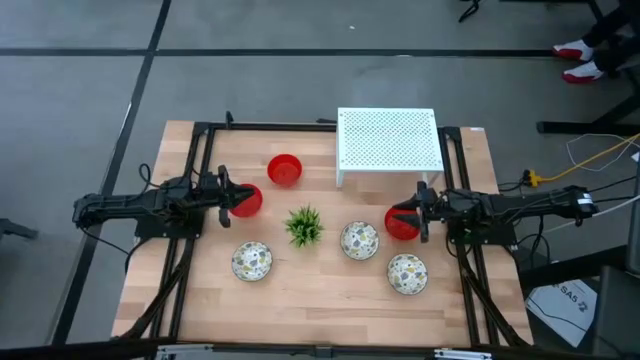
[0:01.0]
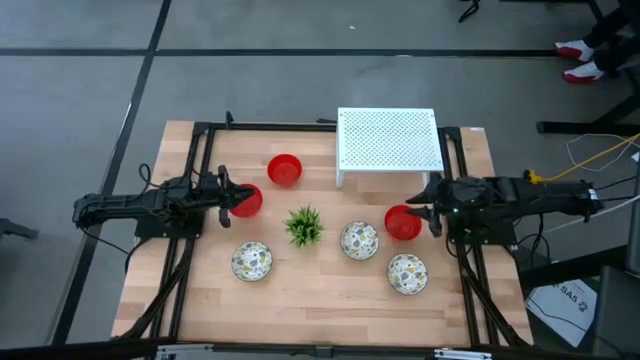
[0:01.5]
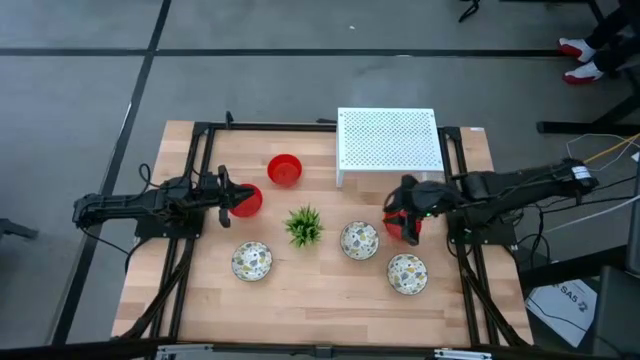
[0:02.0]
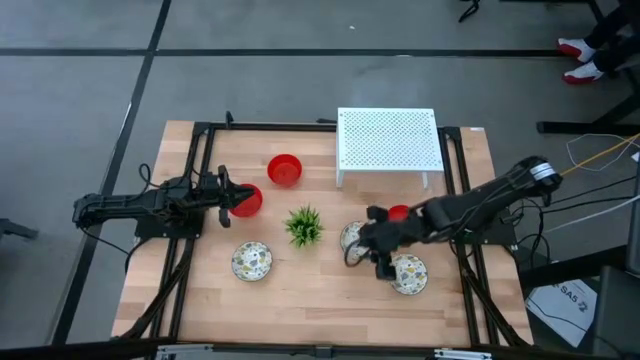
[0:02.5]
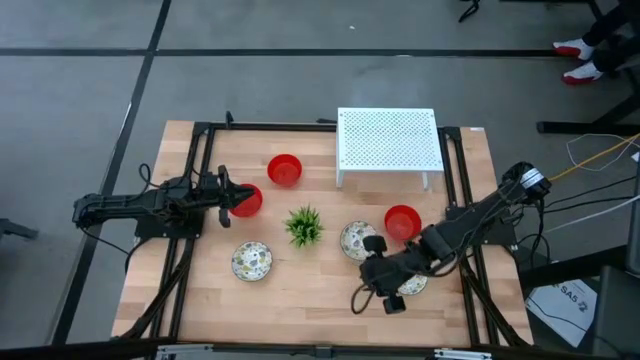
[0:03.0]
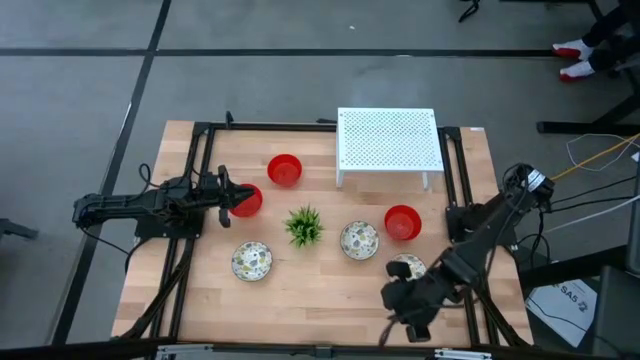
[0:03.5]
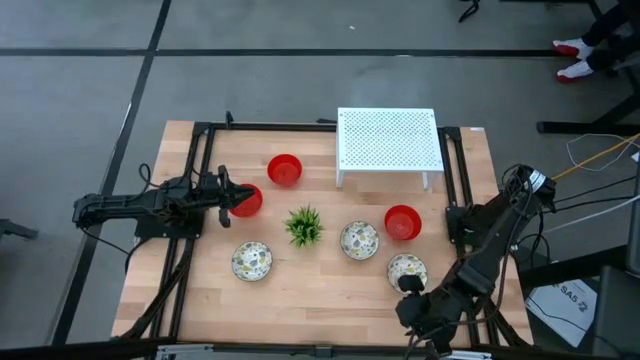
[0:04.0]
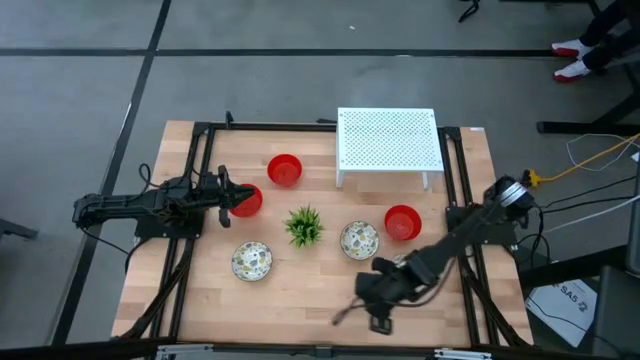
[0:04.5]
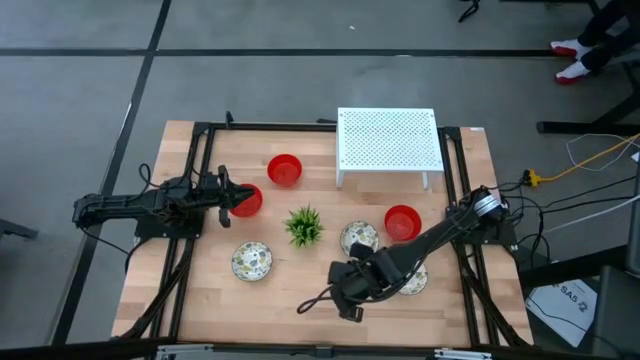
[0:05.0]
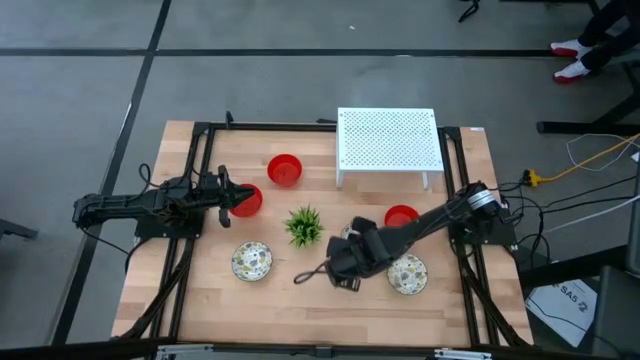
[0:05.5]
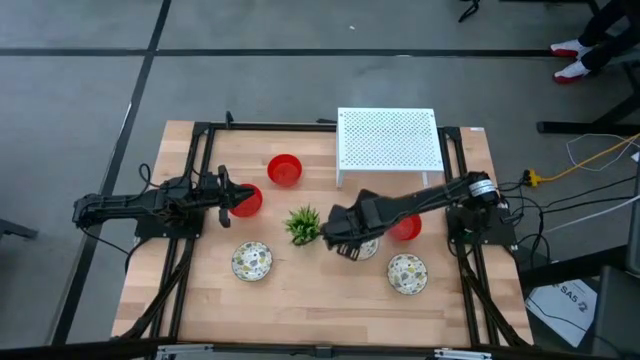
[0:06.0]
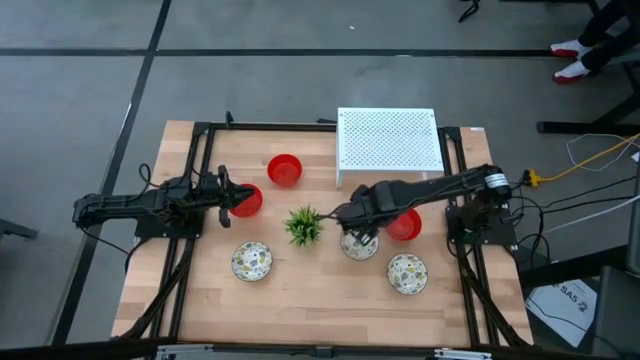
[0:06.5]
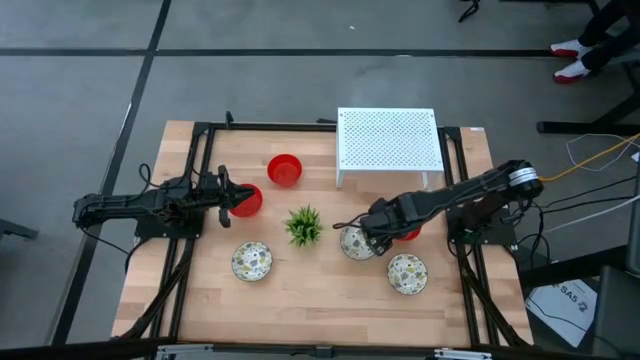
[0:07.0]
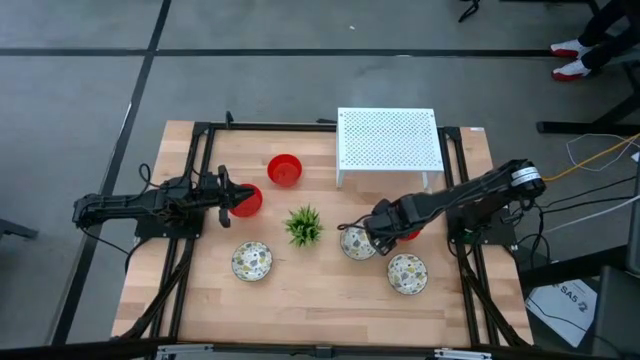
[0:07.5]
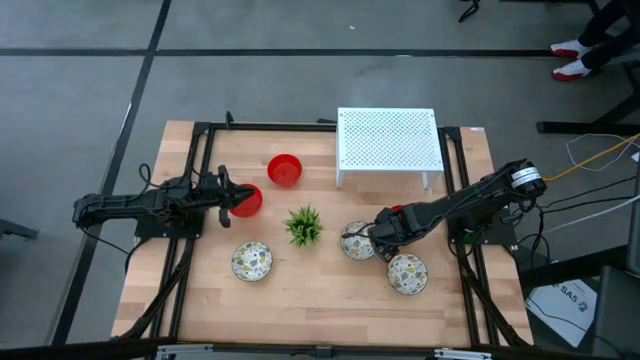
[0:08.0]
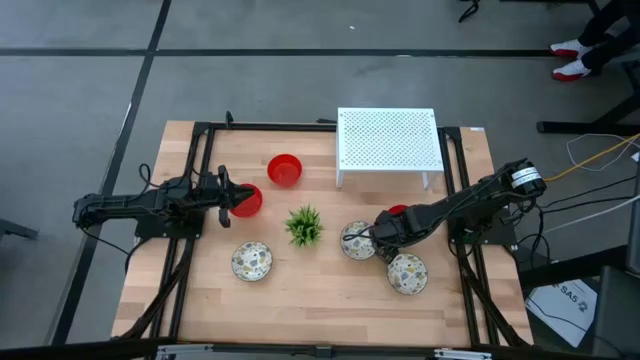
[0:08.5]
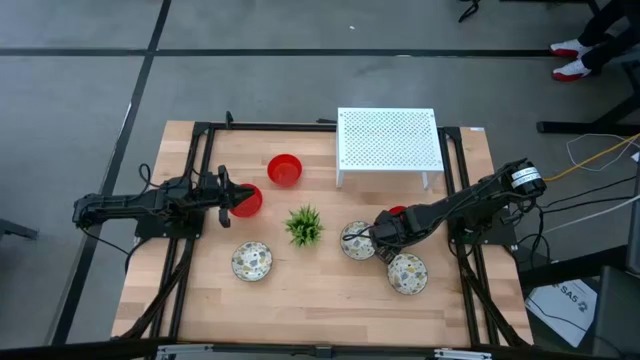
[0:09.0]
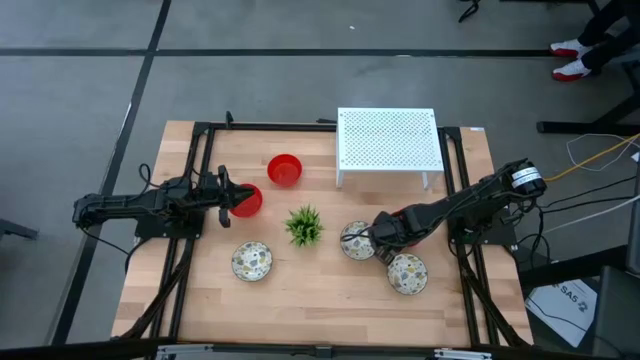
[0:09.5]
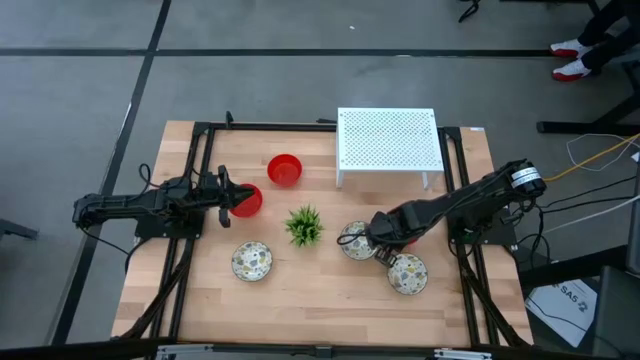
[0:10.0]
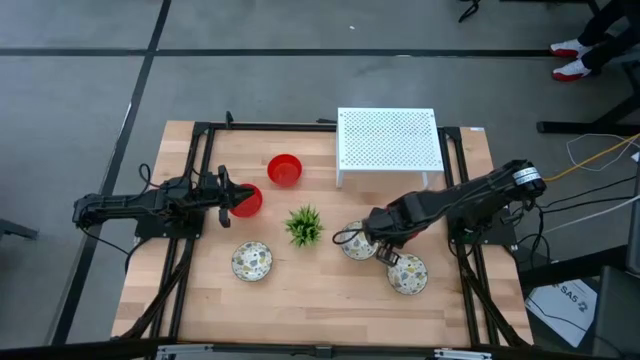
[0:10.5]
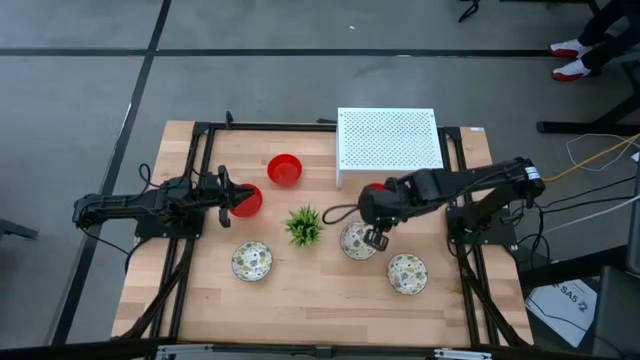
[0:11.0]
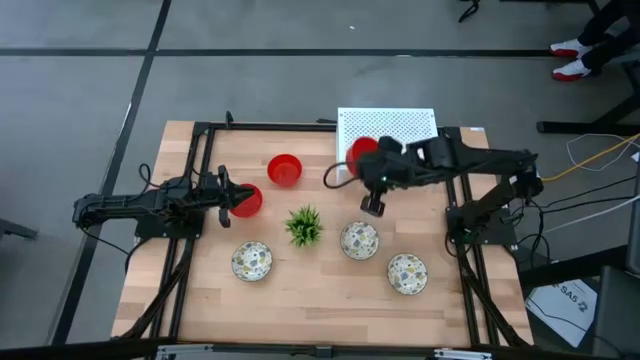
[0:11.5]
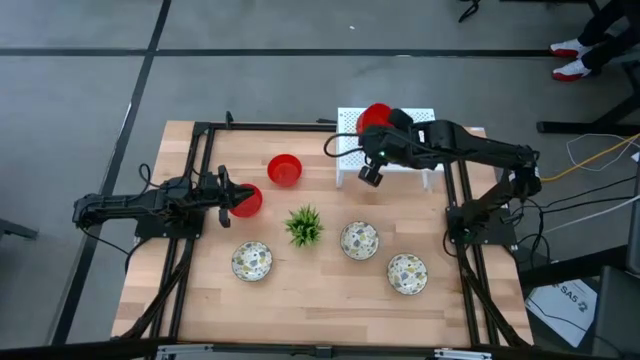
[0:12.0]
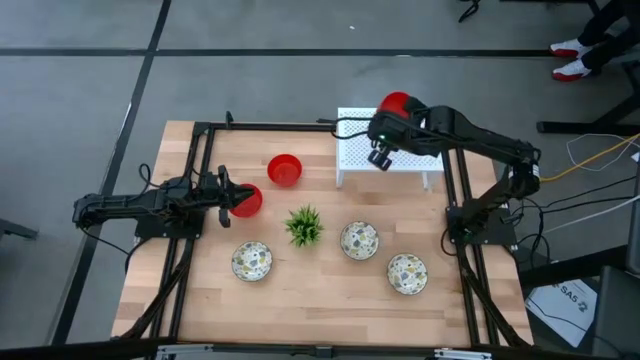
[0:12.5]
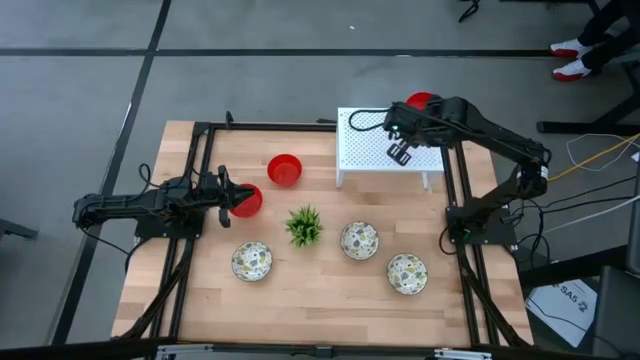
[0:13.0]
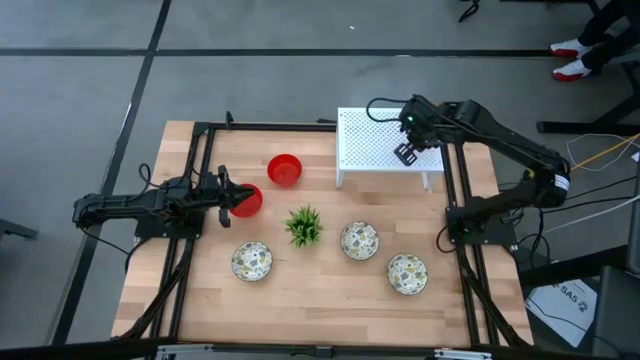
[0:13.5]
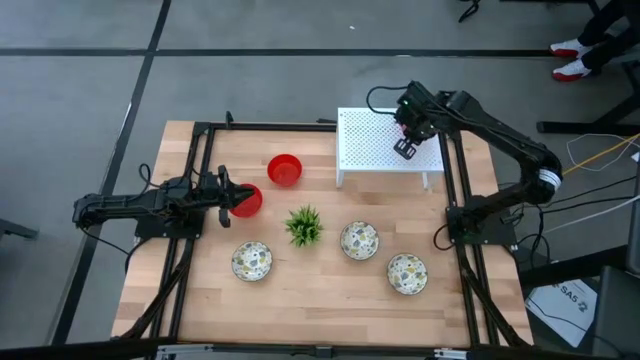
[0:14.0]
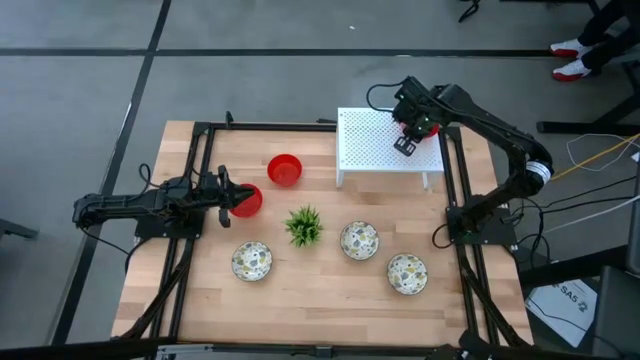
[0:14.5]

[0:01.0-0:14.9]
Task: Pick & Place Mini bowls
Put the bottom right red bowl on the shelf

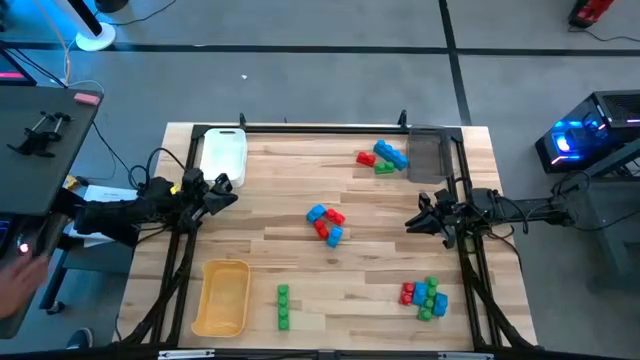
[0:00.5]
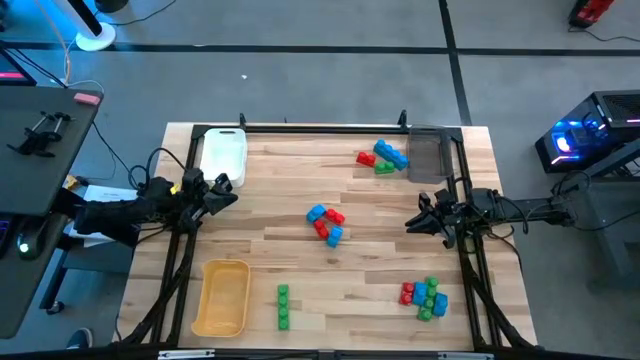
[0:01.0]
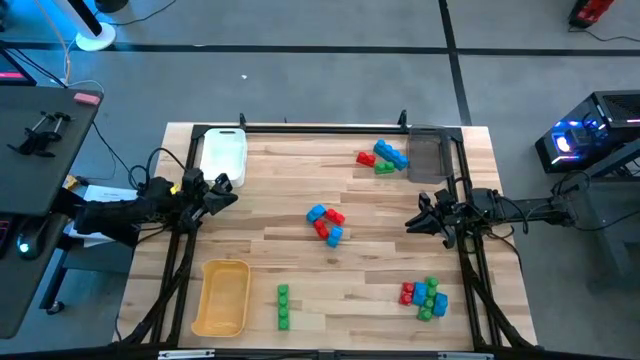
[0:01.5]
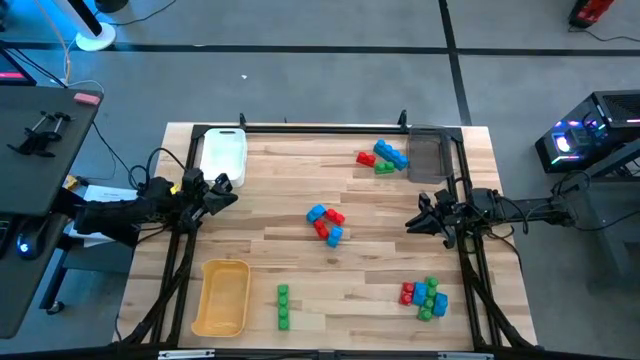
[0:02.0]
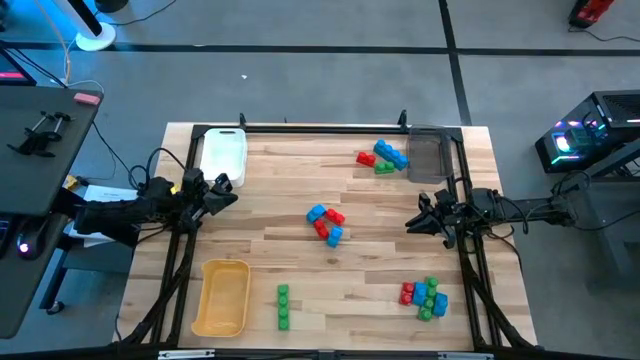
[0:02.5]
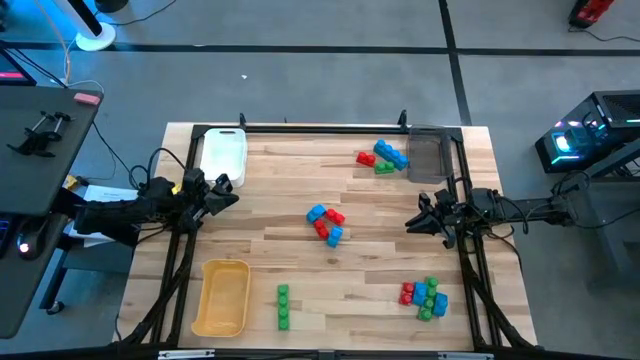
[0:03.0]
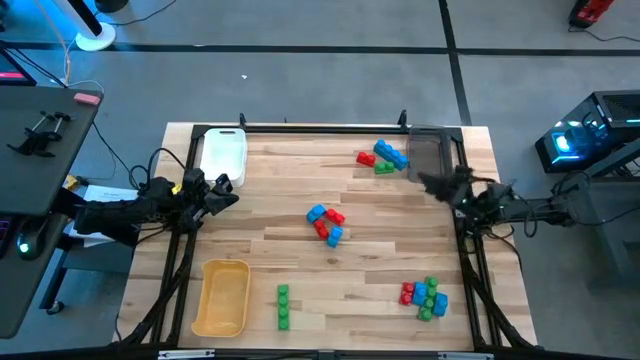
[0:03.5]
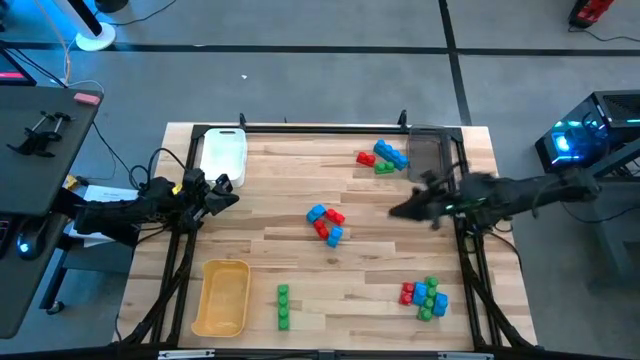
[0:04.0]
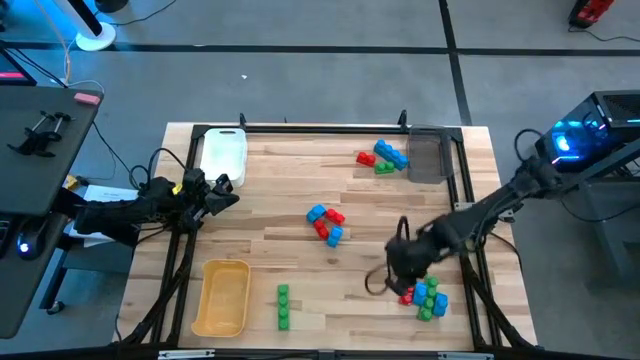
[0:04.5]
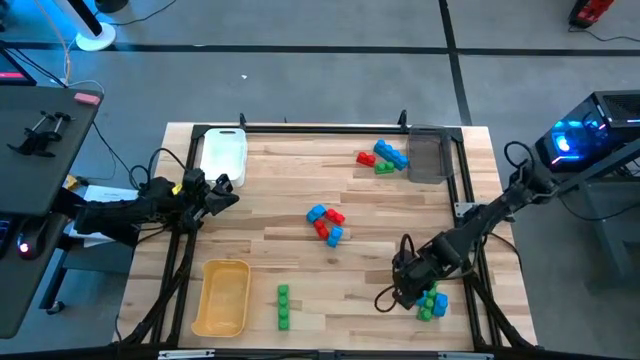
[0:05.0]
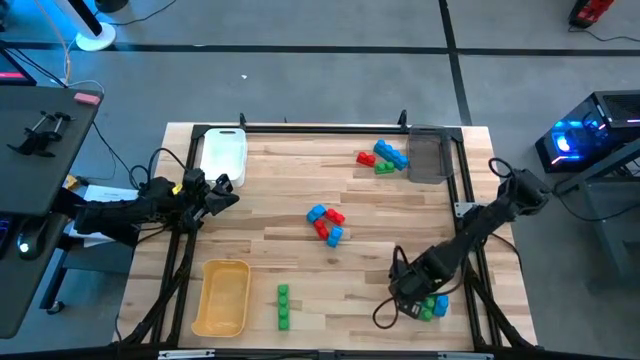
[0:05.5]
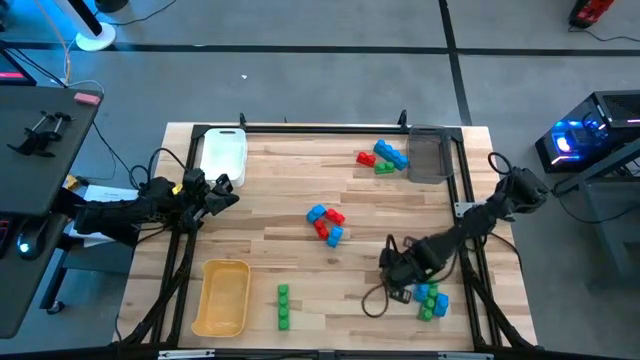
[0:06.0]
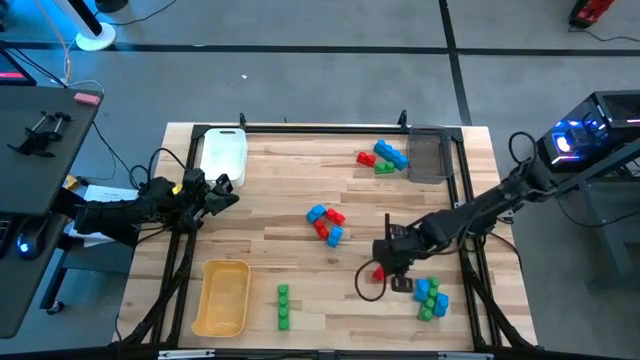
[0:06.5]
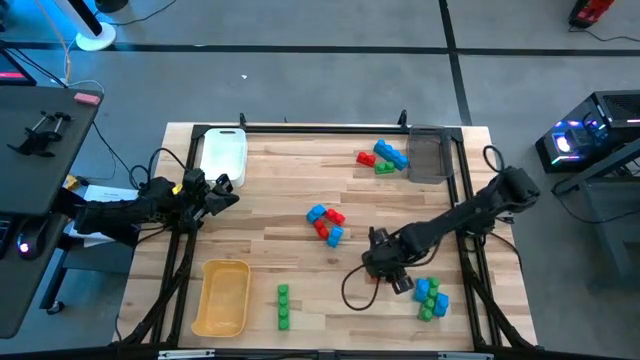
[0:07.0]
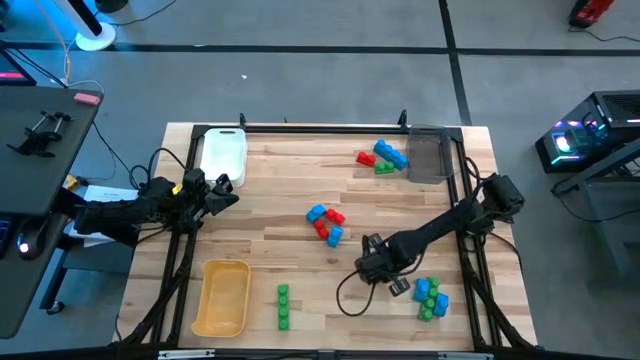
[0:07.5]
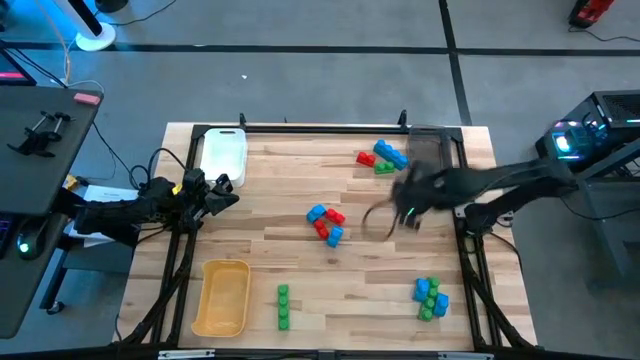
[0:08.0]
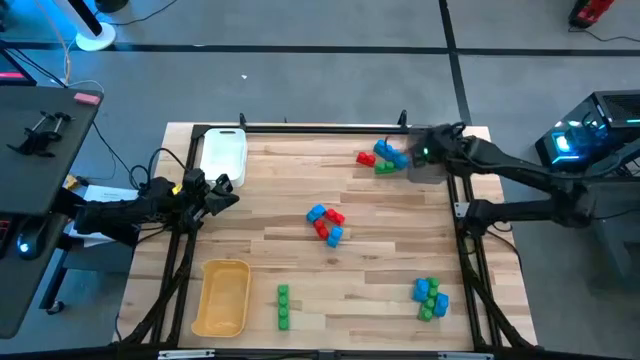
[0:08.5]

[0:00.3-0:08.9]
Task: Sort blocks
Put the red game piece into the black bin
